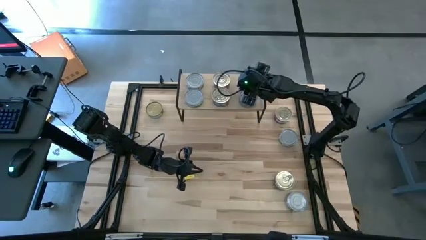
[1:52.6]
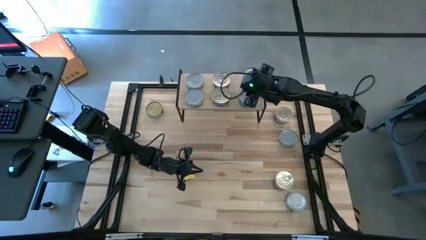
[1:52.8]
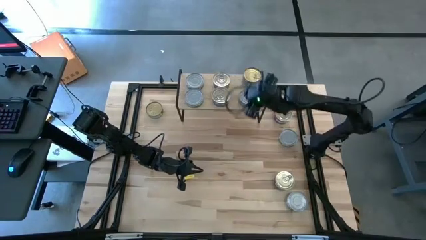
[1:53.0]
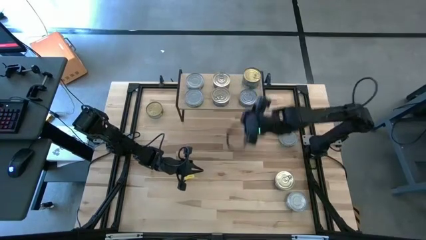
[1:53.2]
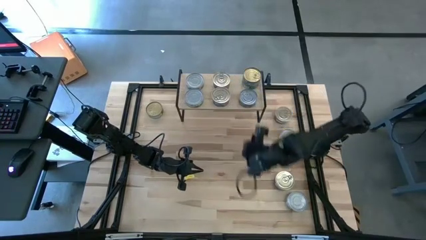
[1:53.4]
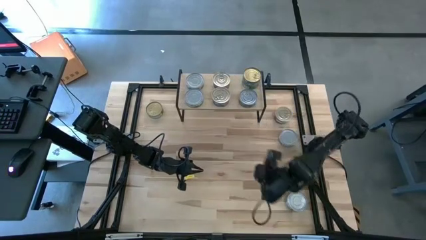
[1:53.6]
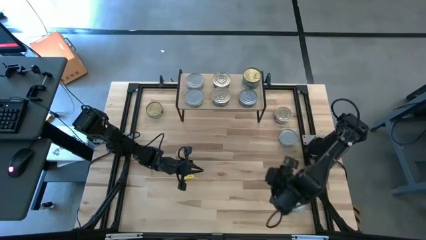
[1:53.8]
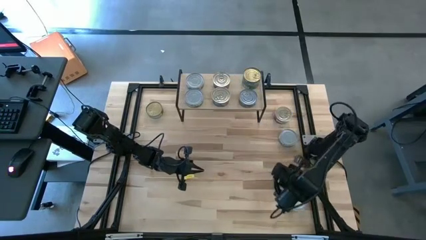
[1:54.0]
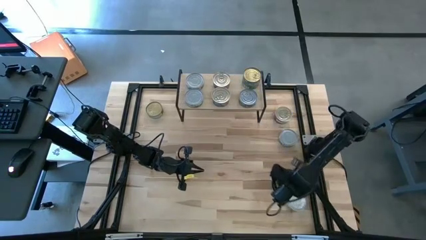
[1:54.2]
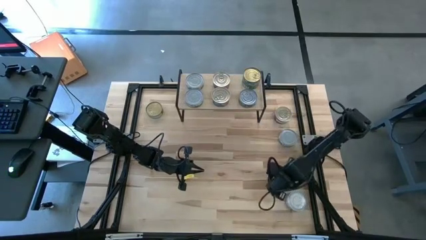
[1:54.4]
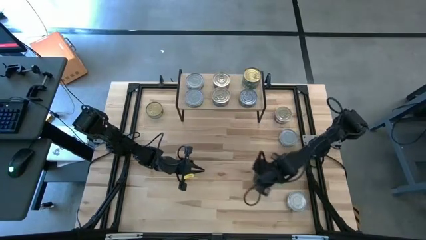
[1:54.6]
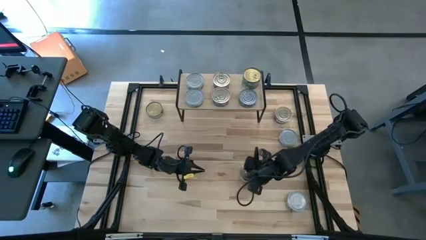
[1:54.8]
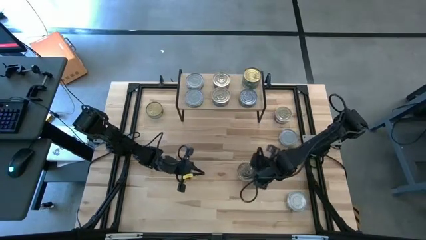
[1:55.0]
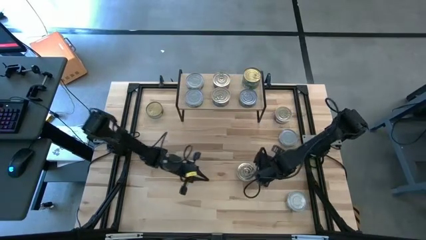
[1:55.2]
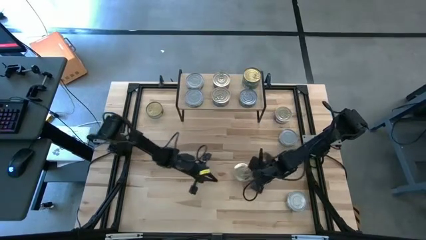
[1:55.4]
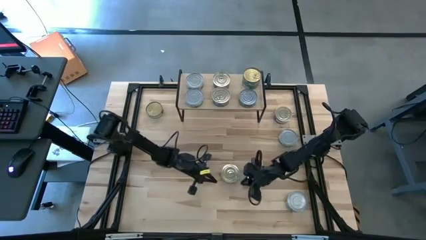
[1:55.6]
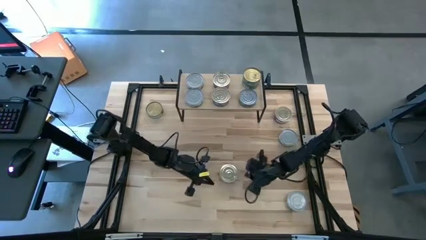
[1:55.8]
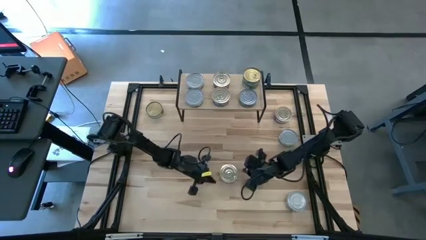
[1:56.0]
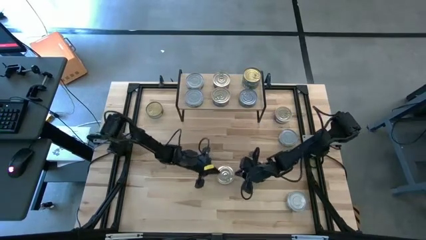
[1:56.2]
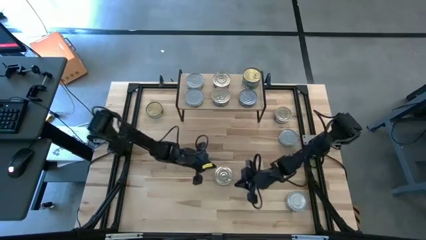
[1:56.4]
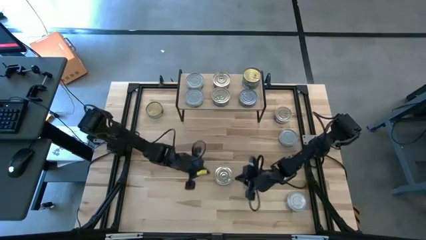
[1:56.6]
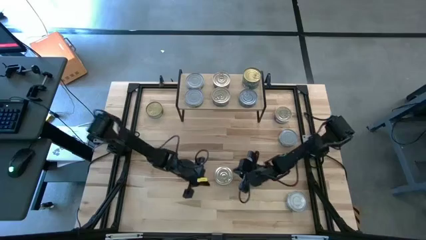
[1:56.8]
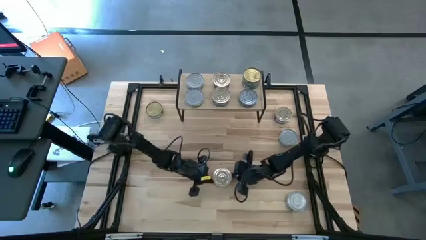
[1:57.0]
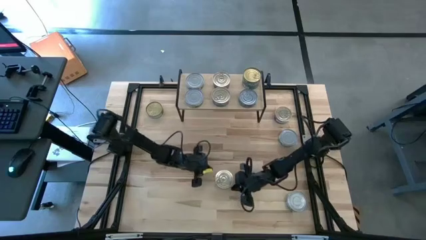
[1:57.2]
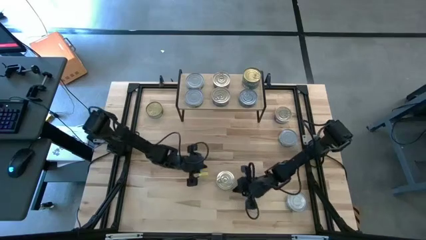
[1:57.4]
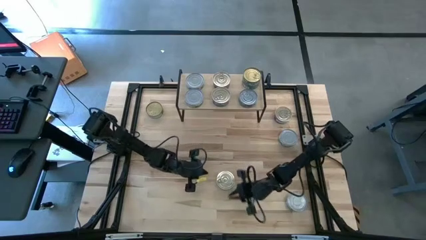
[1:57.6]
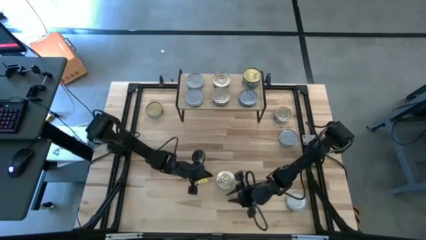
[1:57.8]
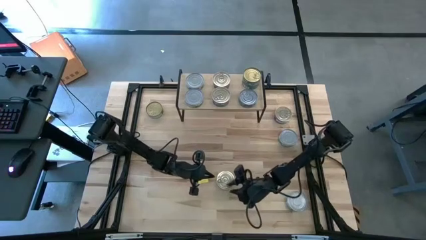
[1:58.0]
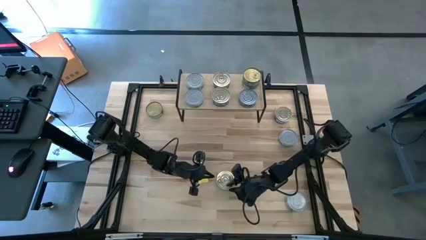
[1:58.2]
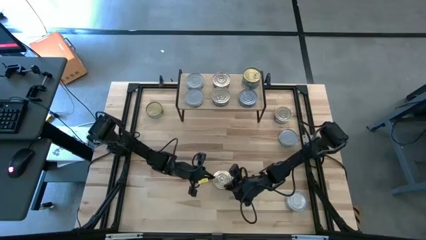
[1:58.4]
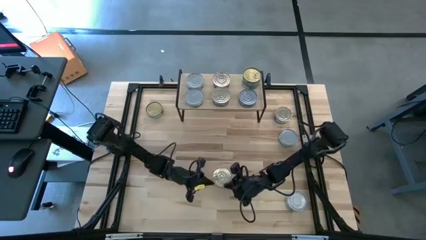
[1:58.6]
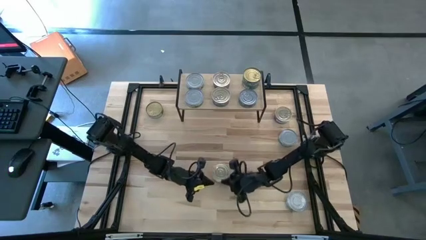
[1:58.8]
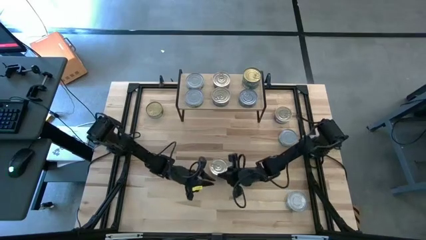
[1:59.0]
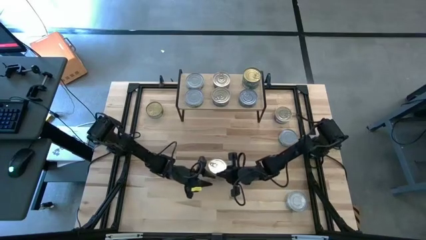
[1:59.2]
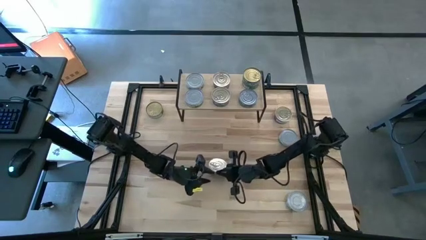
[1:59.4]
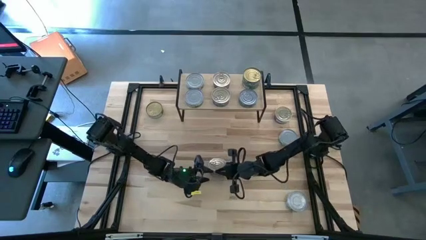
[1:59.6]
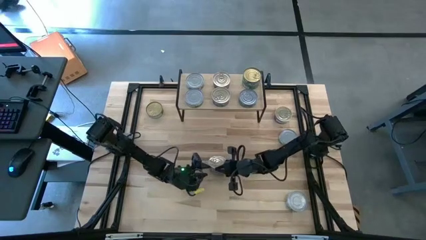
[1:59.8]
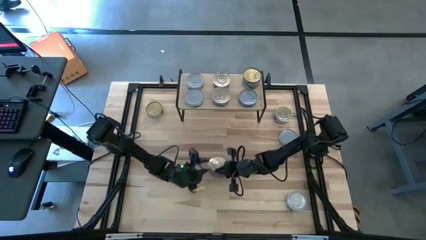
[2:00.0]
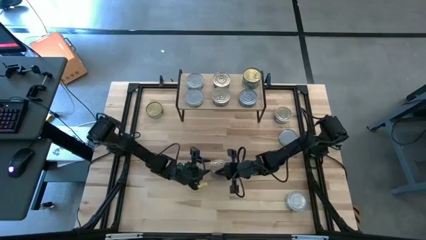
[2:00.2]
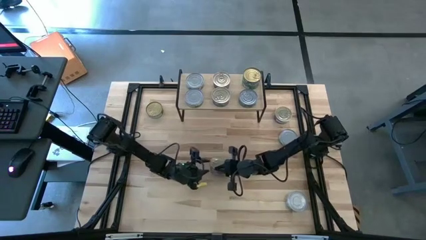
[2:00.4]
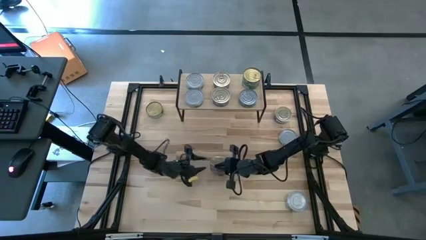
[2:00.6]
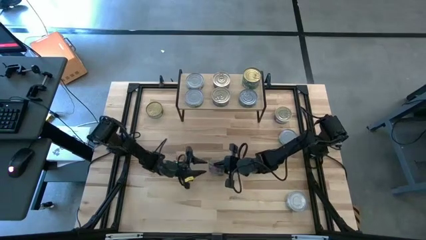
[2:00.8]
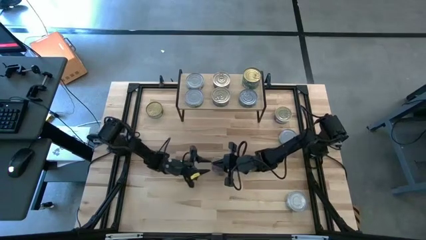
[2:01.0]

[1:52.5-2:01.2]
Task: Stack canned seafood by type on shelf
Stack the blue tuna can on top of the other blue tuna can on the shelf

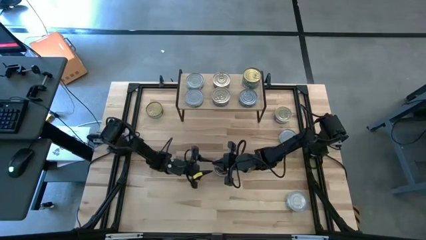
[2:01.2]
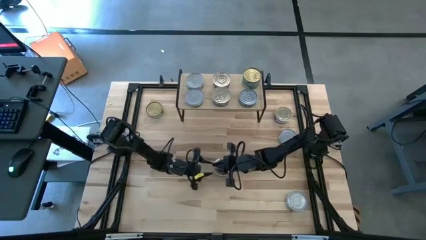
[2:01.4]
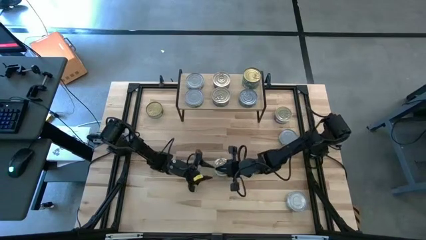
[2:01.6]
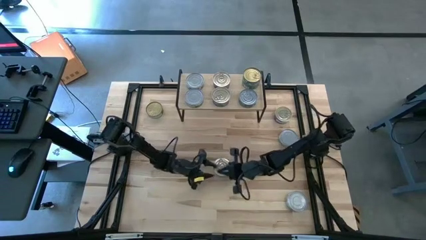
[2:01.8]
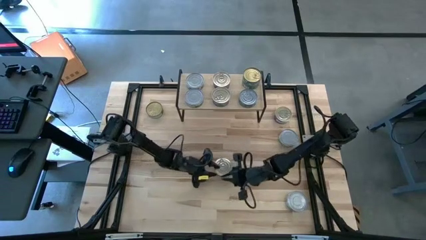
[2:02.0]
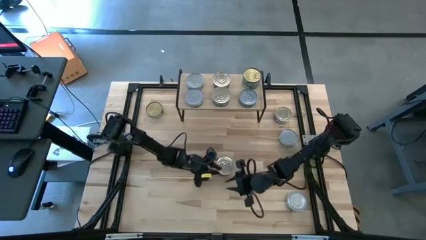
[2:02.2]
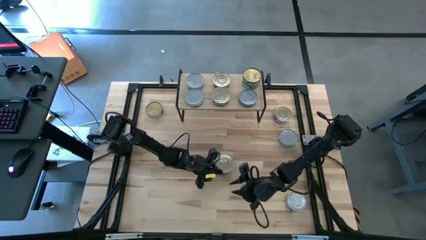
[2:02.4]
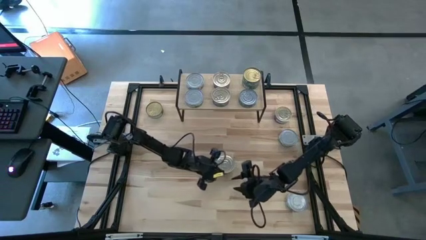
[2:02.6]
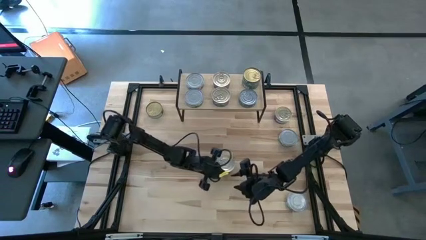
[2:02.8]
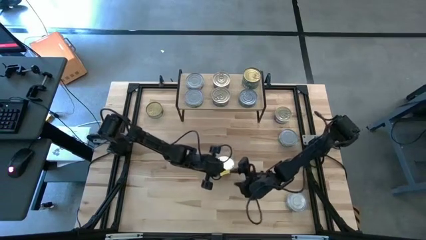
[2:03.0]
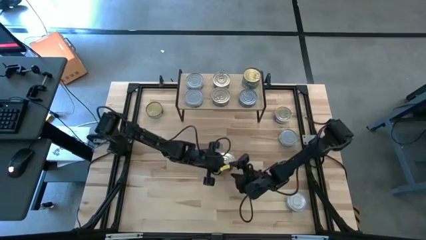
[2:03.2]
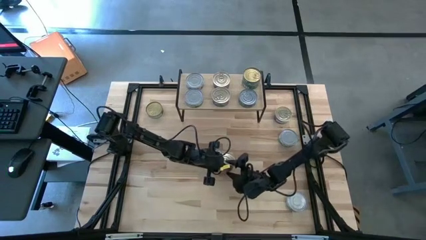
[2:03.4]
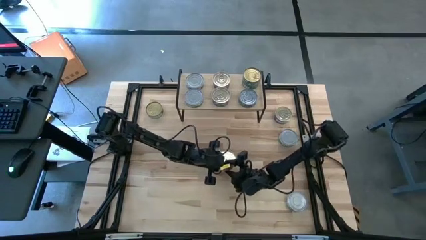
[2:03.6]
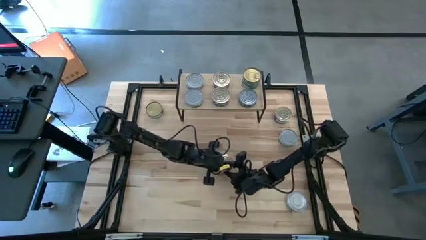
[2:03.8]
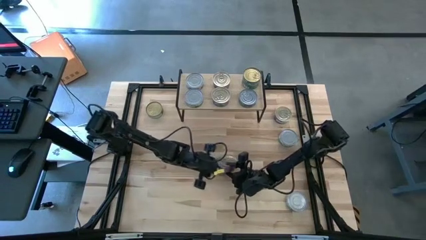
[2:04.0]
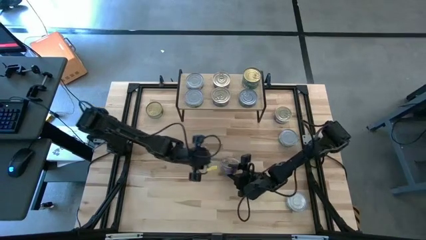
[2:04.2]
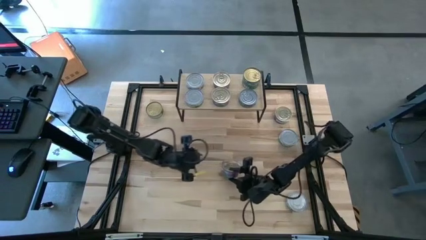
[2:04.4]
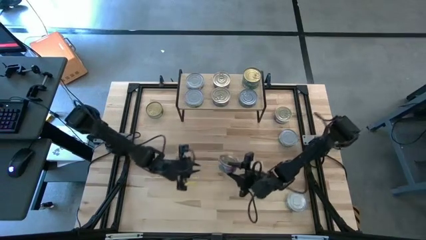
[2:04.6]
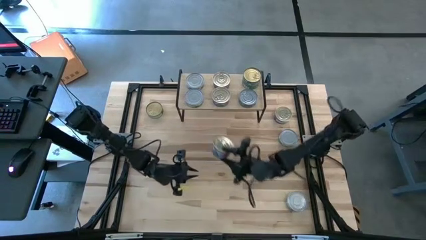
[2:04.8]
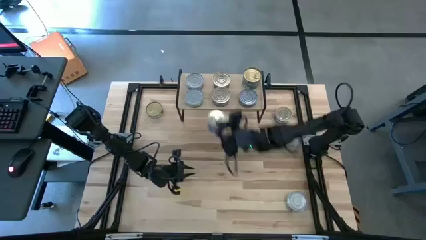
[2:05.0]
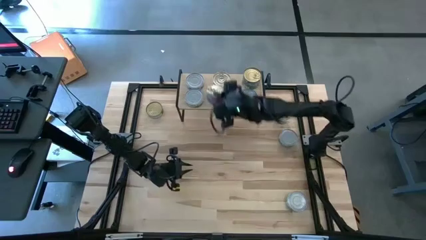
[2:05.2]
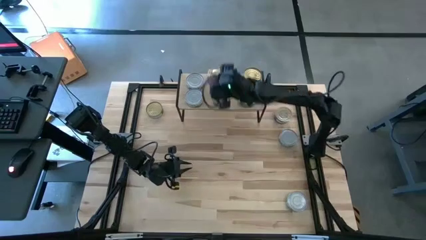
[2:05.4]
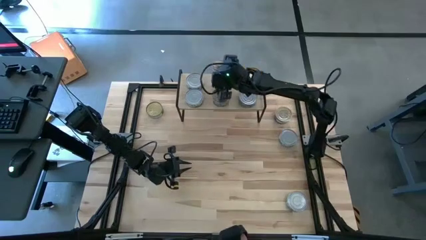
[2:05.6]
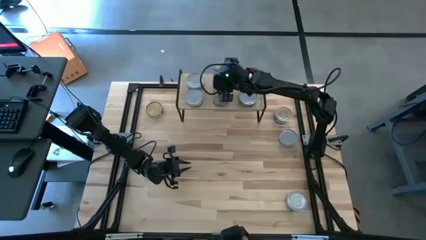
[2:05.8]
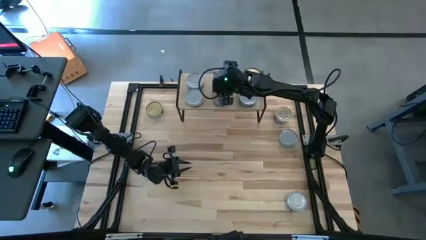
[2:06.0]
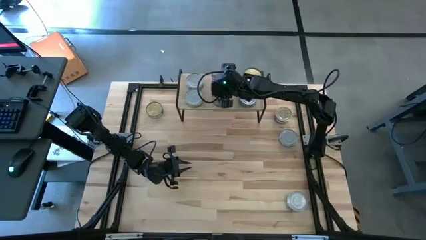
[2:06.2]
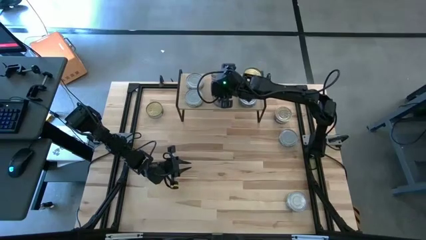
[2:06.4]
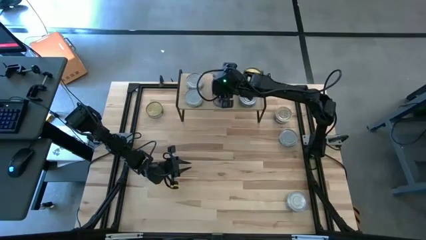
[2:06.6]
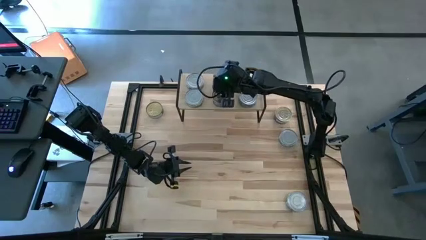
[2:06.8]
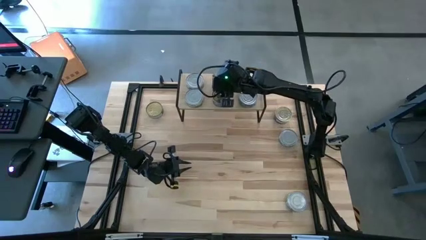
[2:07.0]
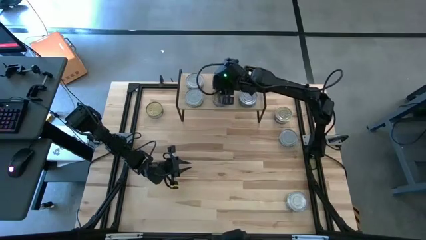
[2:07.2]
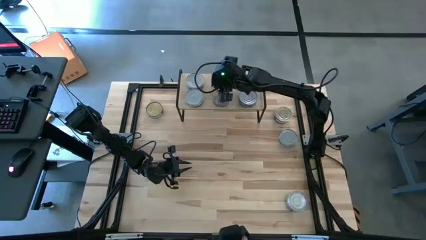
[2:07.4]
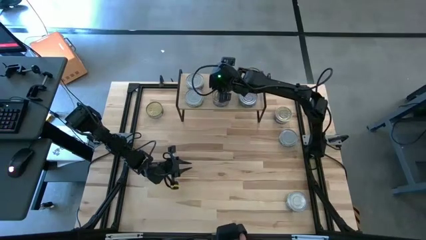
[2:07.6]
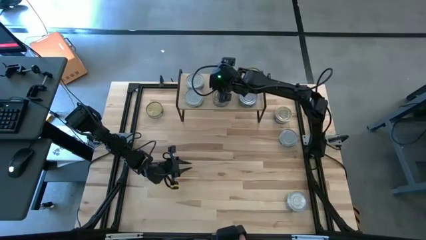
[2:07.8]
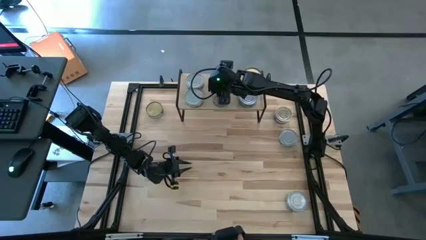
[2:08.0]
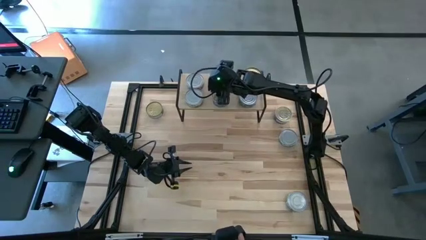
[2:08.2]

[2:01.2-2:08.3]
Stack the blue tuna can on top of the other blue tuna can on the shelf
